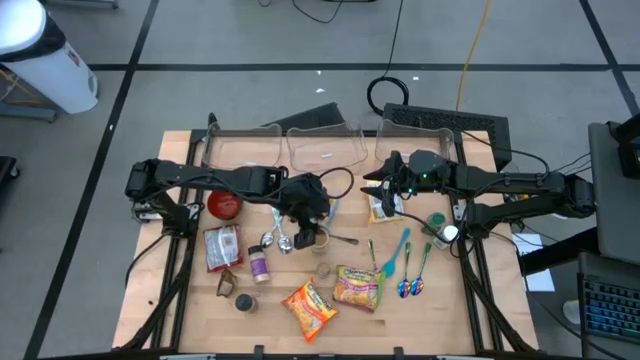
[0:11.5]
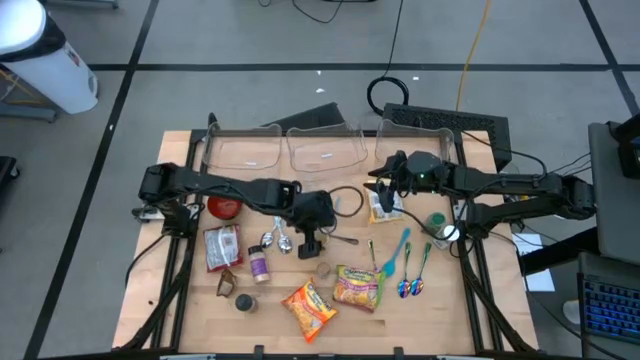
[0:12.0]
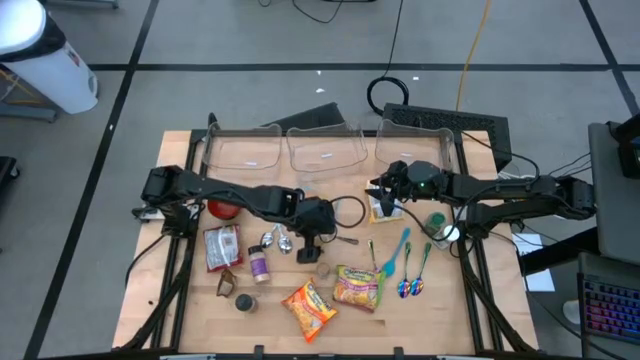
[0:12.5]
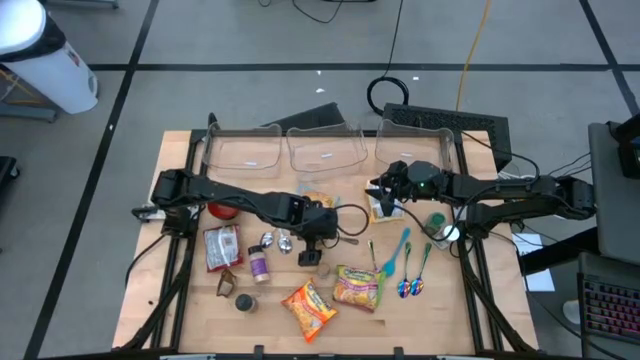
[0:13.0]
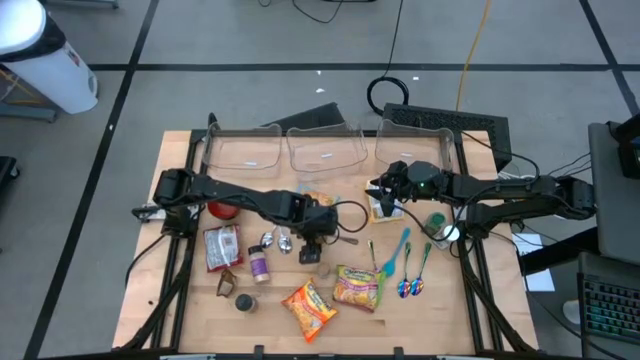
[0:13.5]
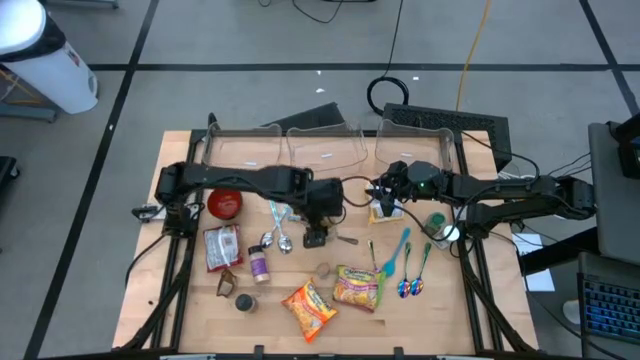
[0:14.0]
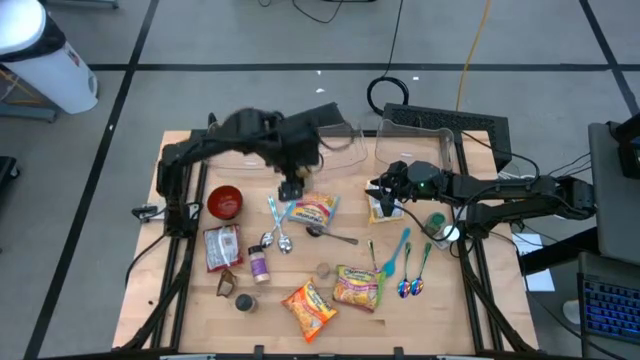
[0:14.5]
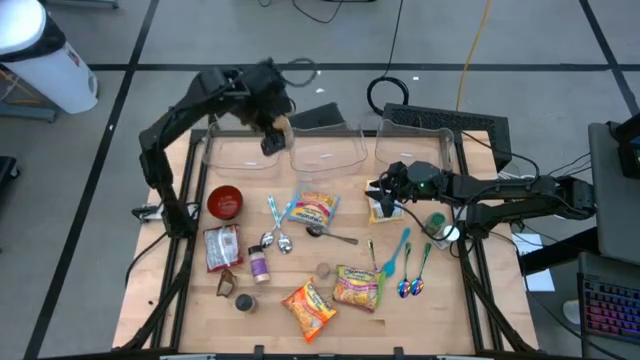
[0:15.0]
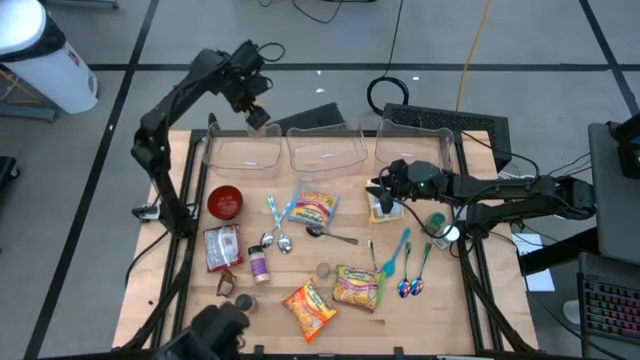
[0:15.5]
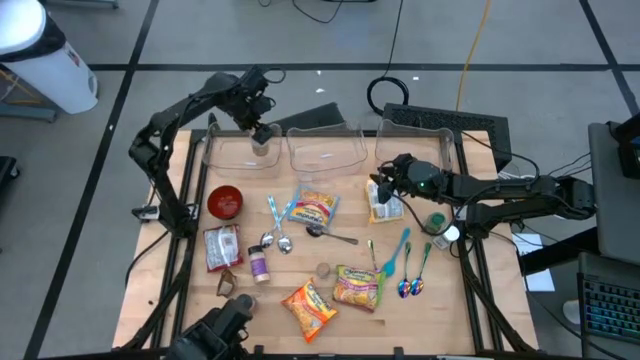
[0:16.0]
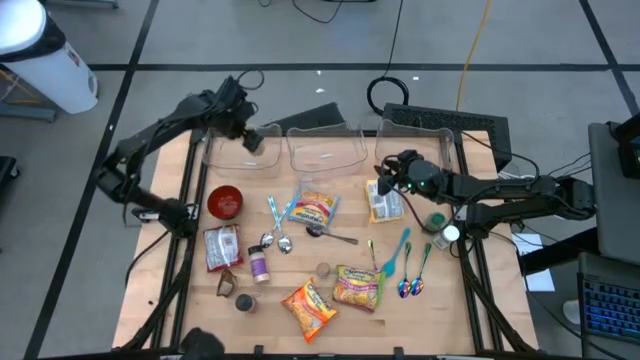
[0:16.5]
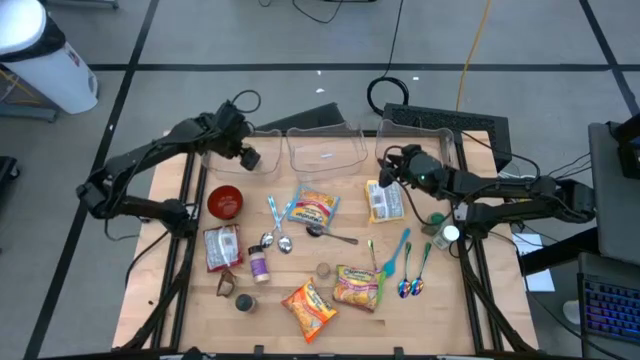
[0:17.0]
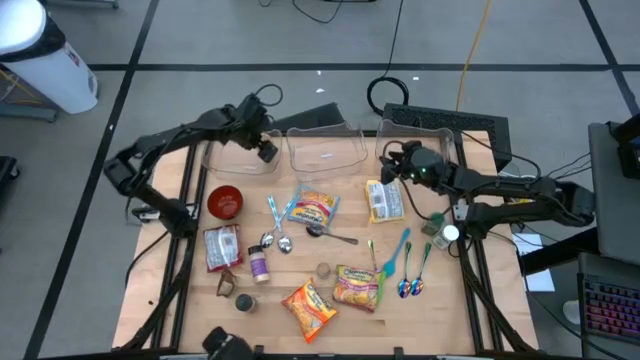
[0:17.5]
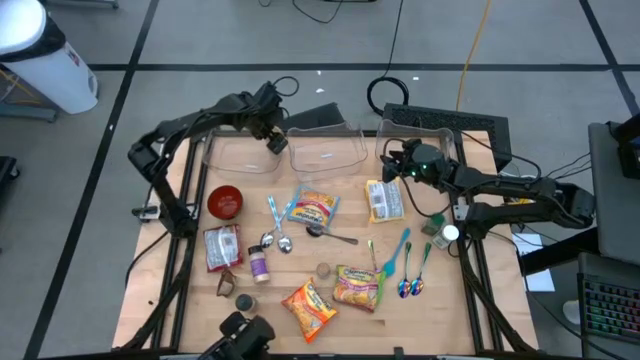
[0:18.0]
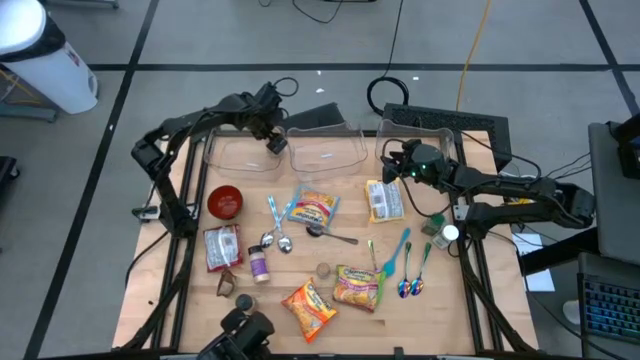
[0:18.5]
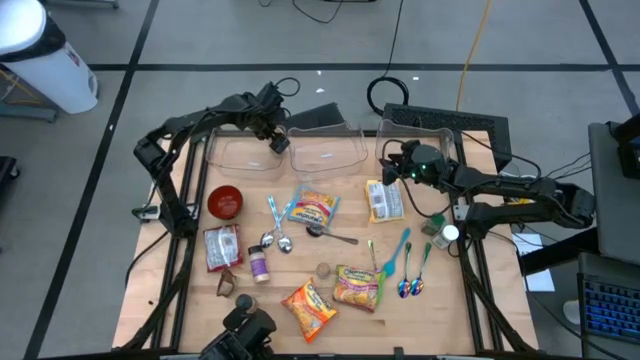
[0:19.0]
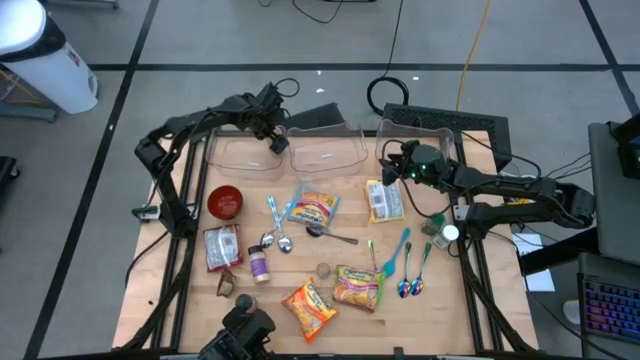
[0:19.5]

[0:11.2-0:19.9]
Task: Pick & Place Food Item
Put the gold seasoning bottle into the left transparent bin

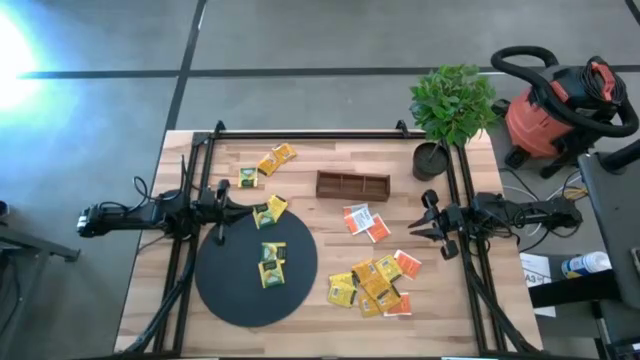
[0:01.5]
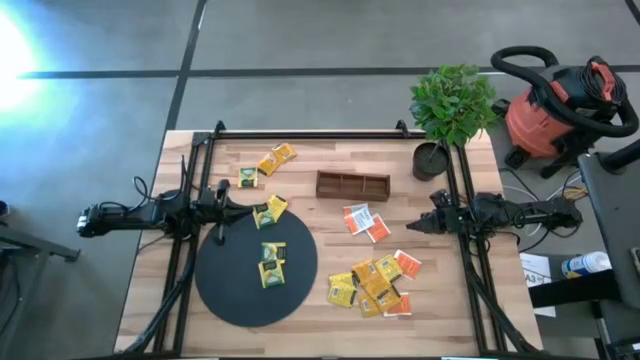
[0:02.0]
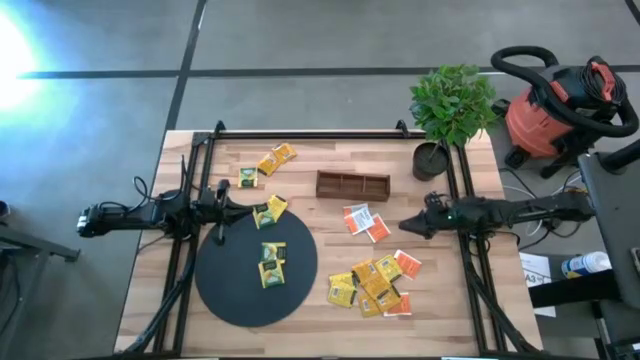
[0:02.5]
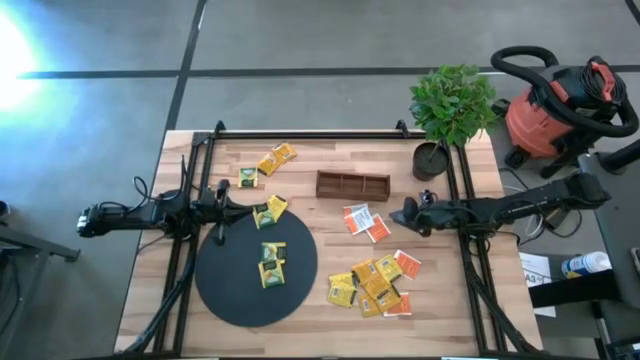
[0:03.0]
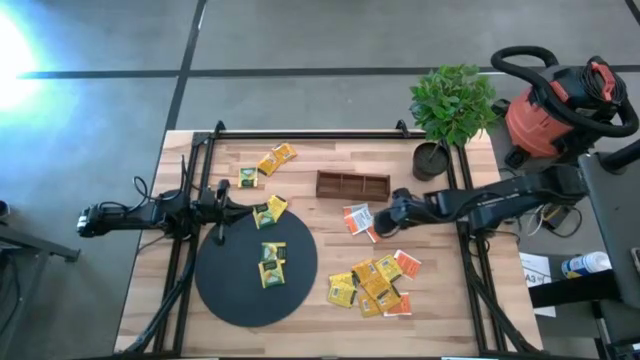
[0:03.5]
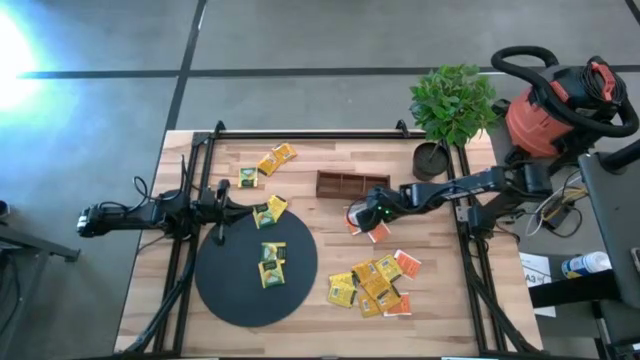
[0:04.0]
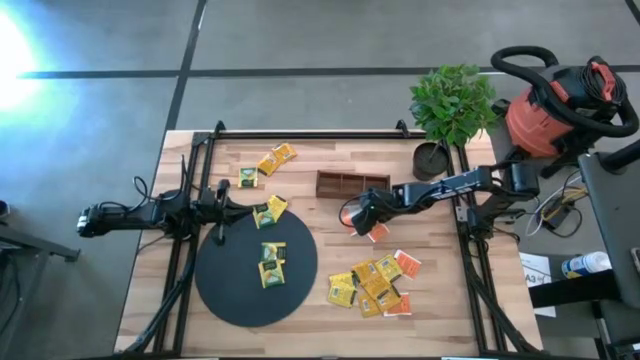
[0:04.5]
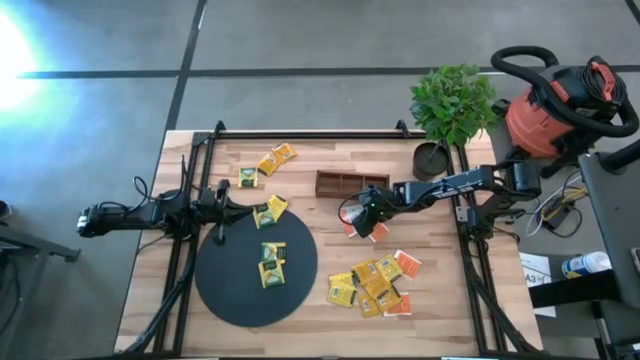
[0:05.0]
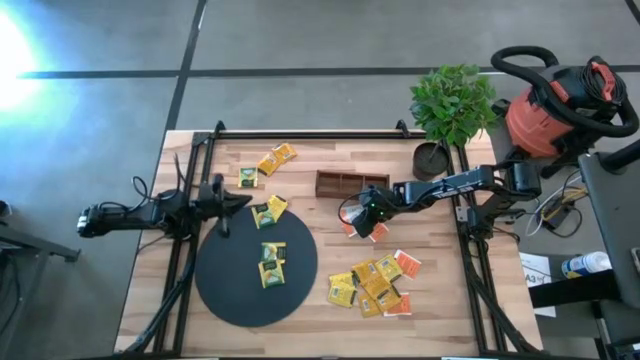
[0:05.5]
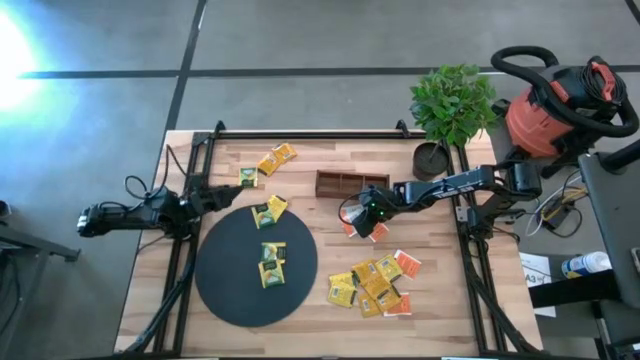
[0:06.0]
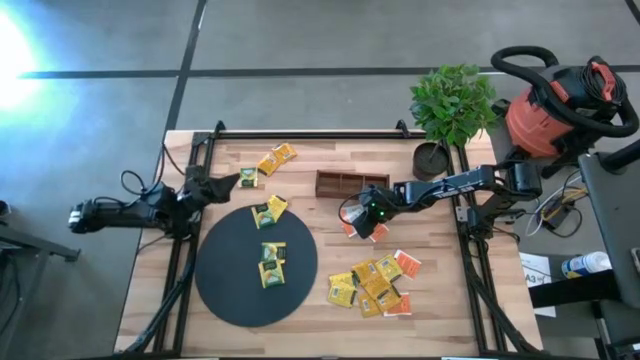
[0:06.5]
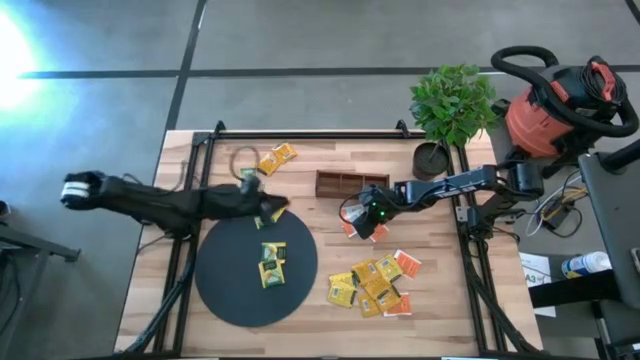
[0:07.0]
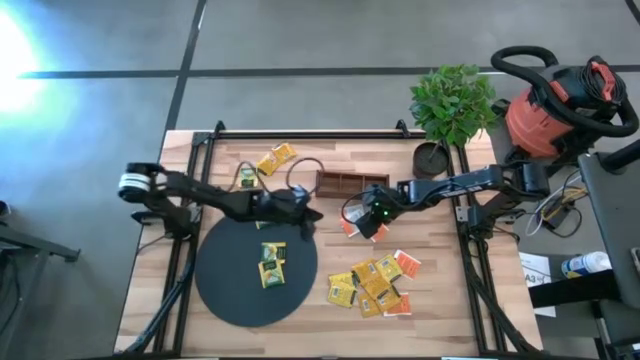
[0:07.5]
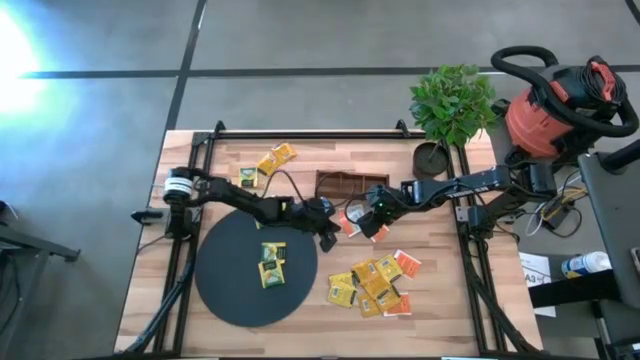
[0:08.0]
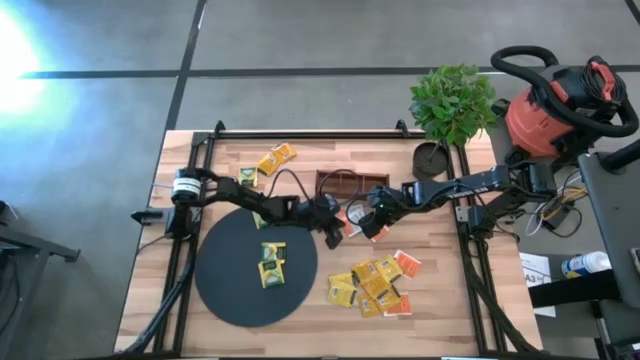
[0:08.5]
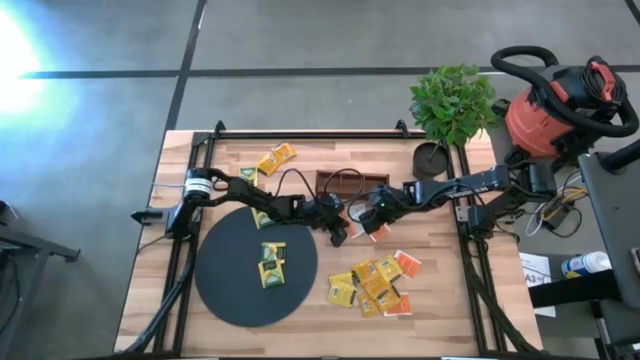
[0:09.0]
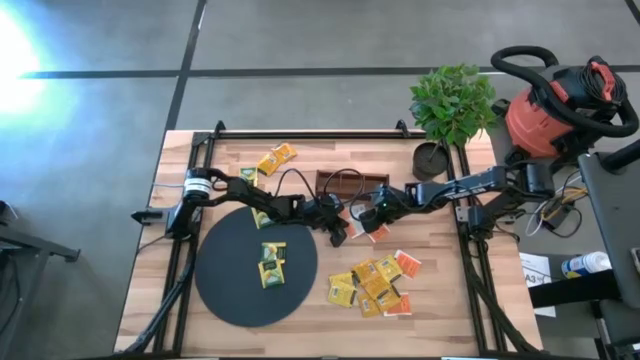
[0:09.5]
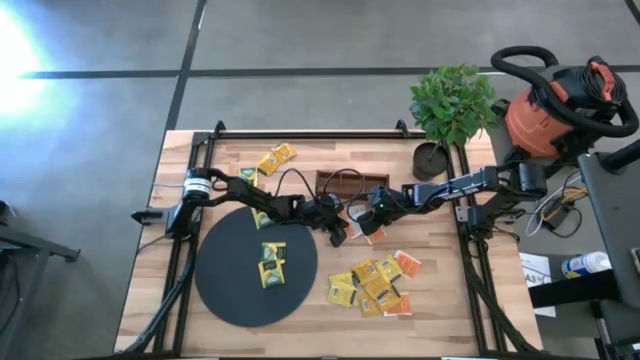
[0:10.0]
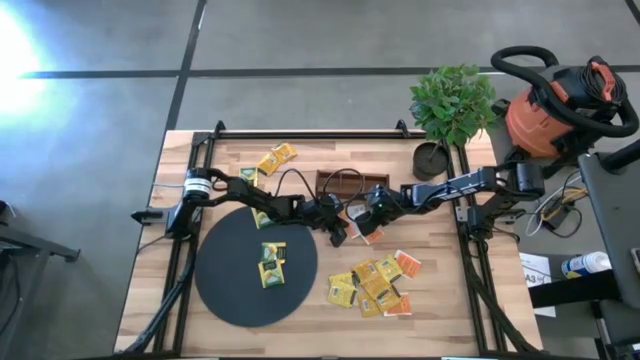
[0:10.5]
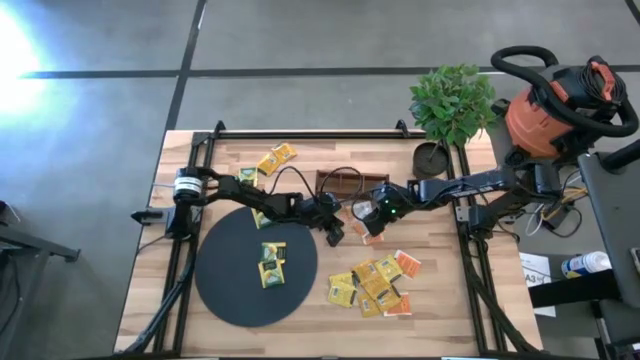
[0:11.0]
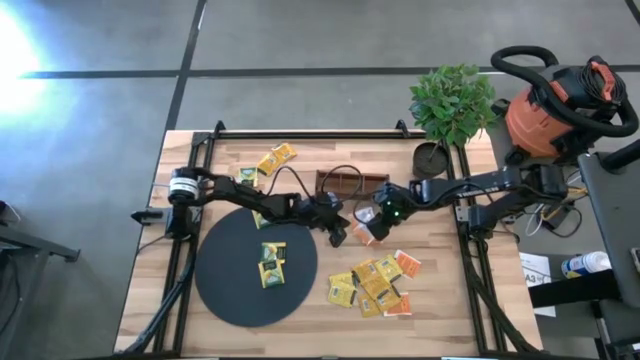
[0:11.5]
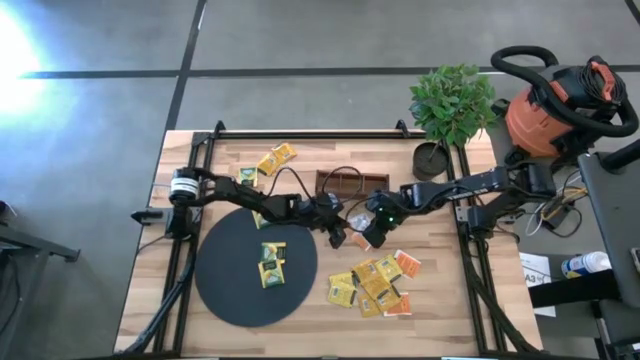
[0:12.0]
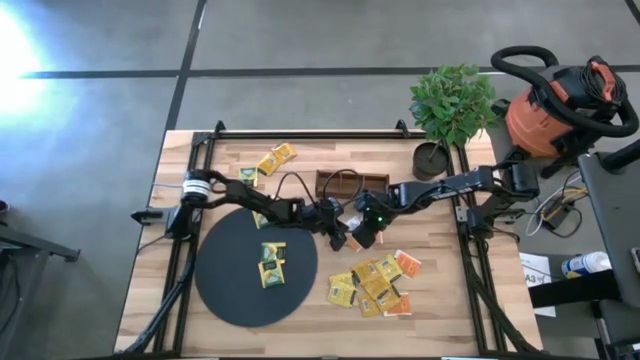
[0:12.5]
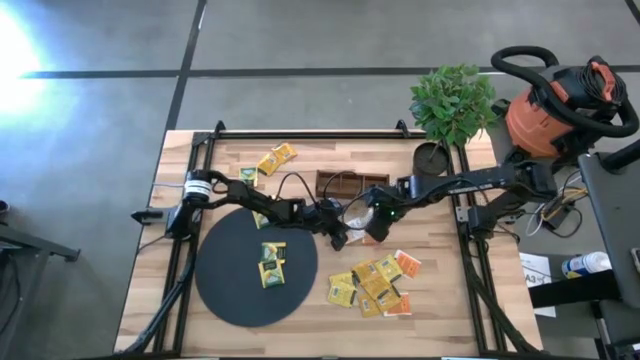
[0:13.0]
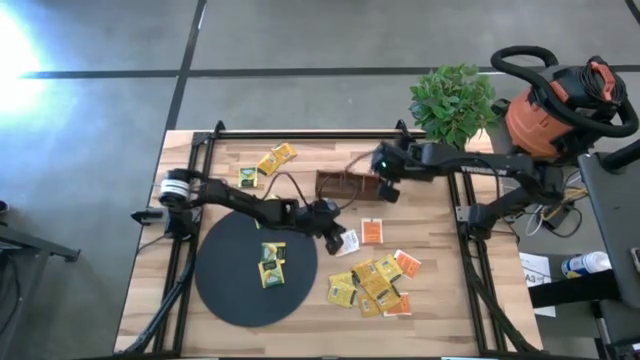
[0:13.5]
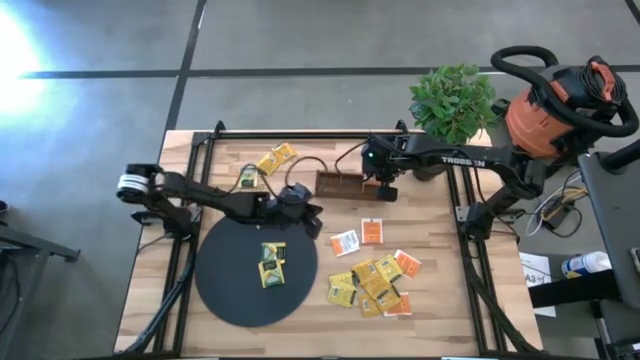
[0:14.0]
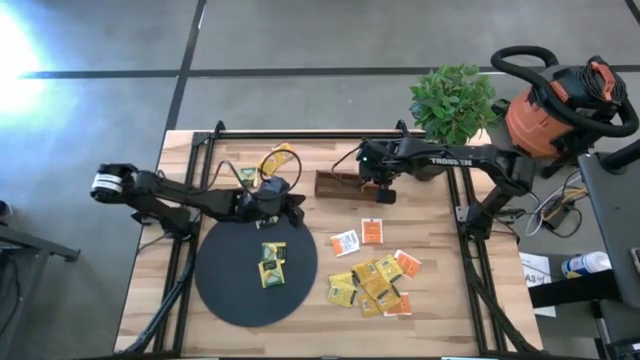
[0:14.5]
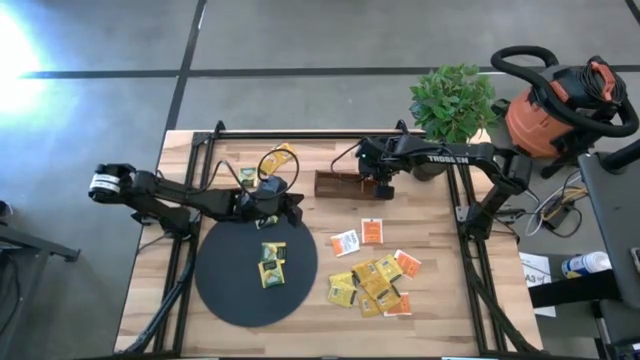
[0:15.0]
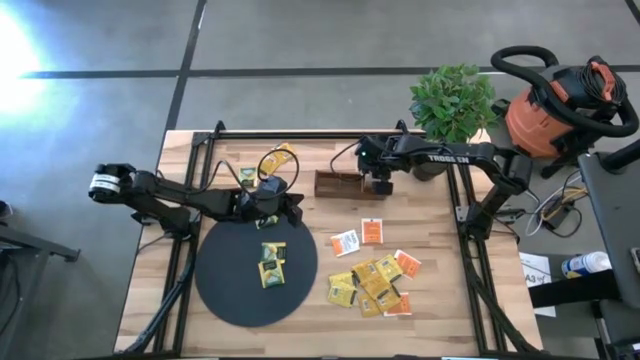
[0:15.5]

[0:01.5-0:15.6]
Task: Pick & Place Tea
Put the white tea bag into the right section of the wooden organizer
